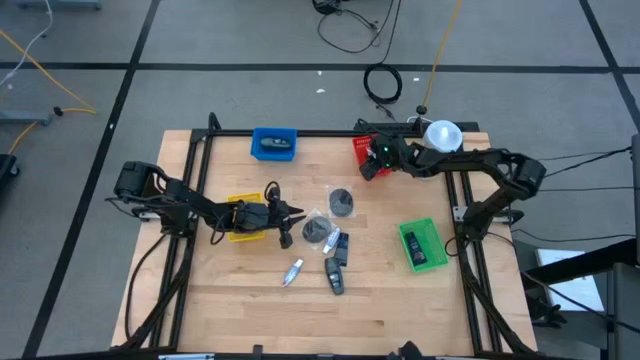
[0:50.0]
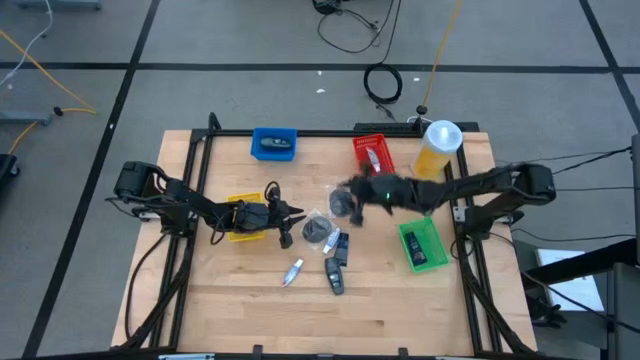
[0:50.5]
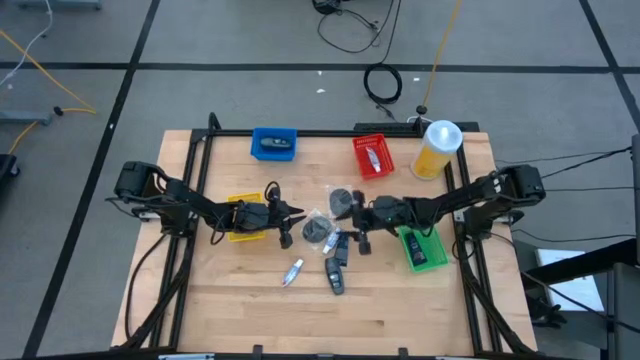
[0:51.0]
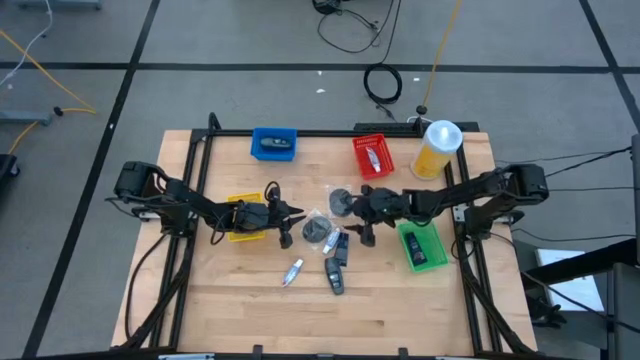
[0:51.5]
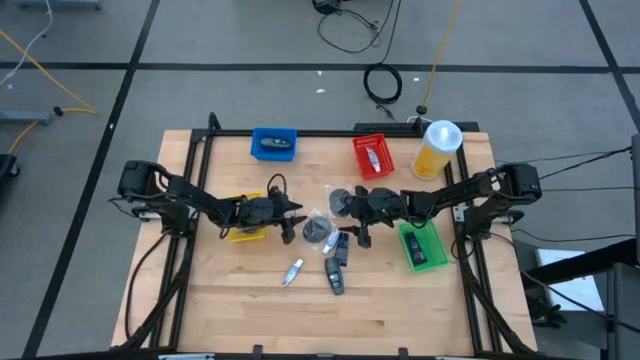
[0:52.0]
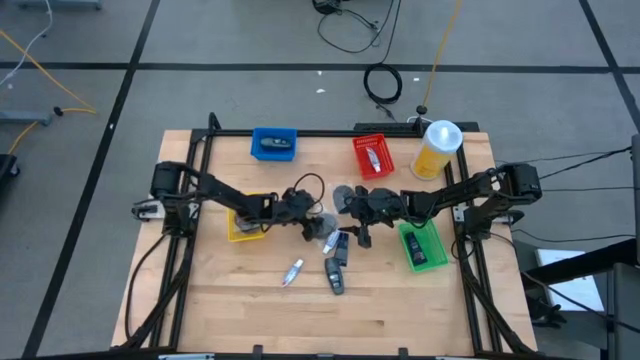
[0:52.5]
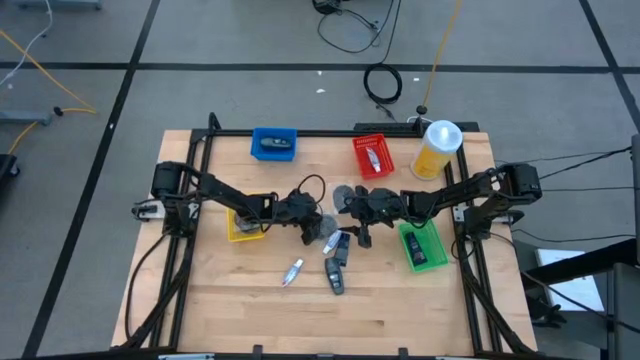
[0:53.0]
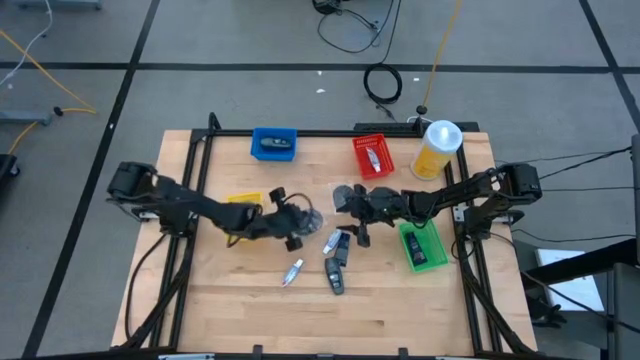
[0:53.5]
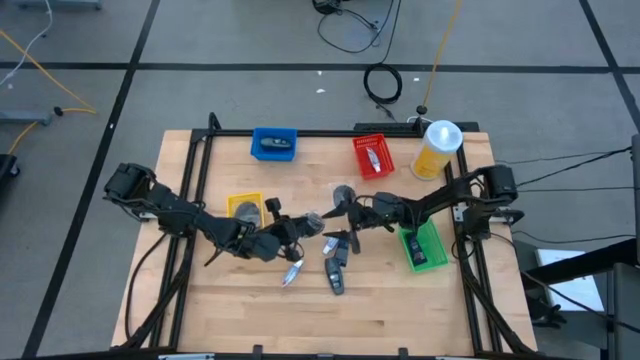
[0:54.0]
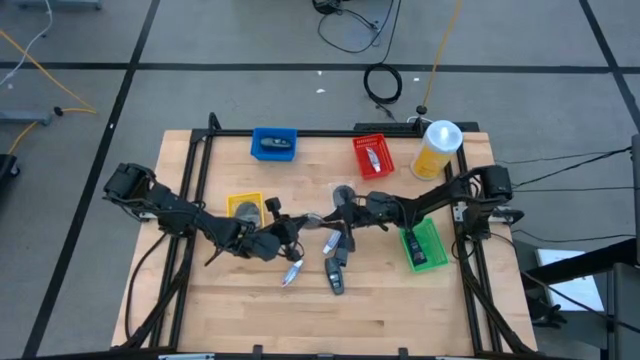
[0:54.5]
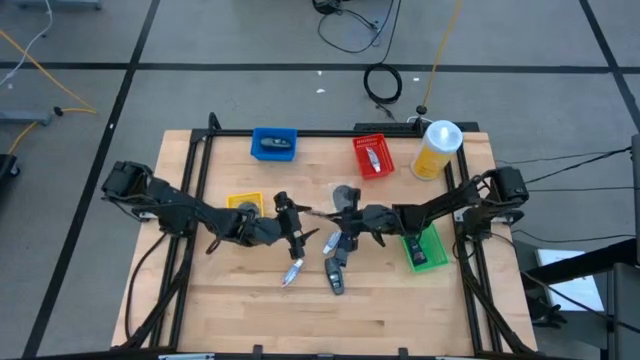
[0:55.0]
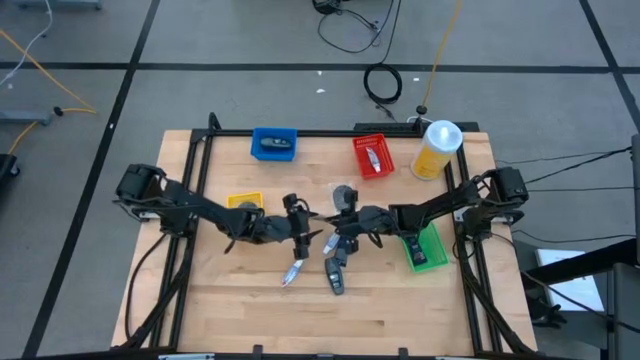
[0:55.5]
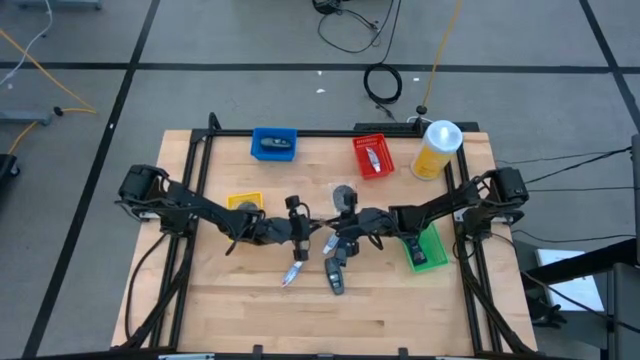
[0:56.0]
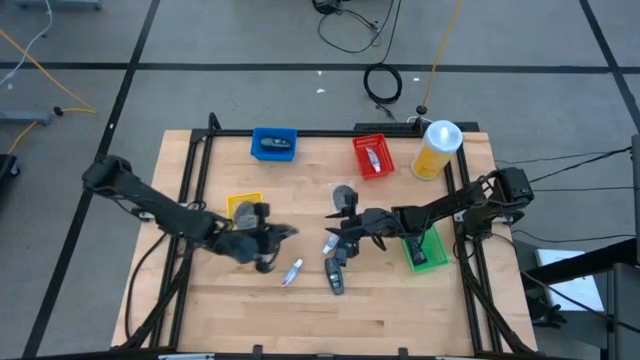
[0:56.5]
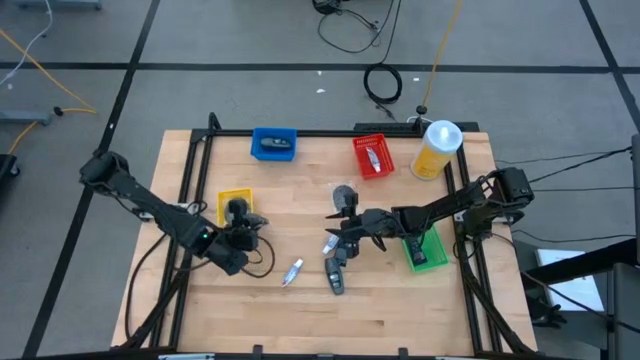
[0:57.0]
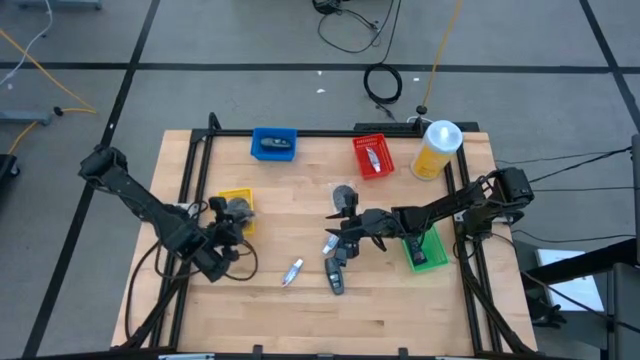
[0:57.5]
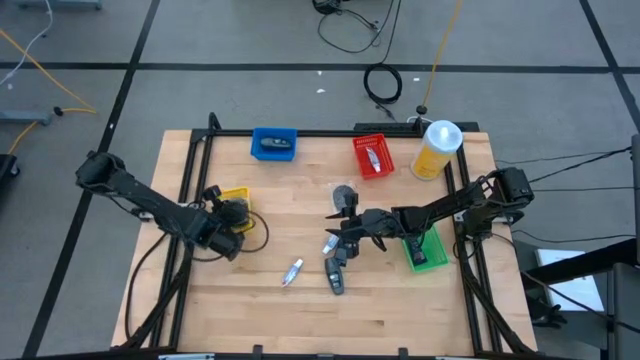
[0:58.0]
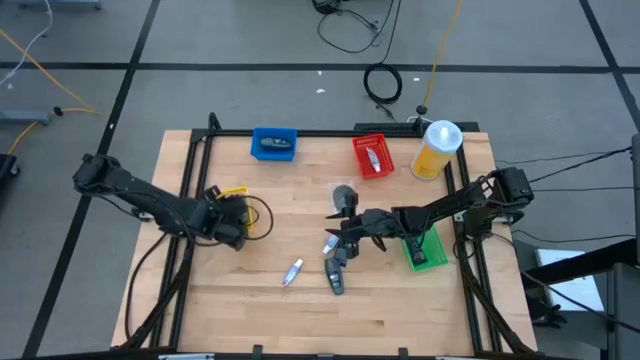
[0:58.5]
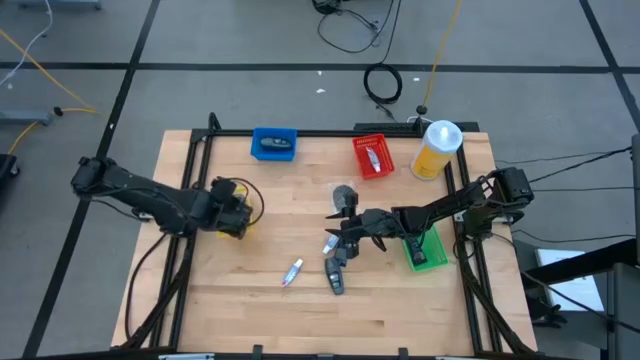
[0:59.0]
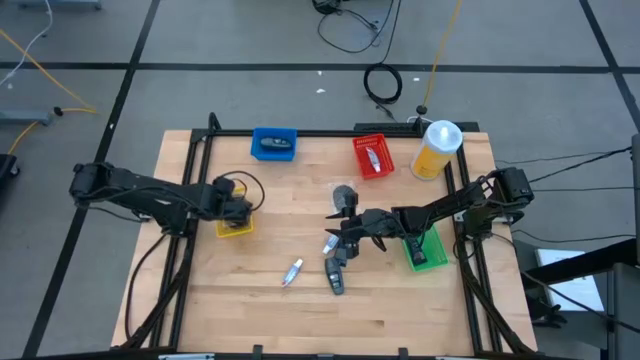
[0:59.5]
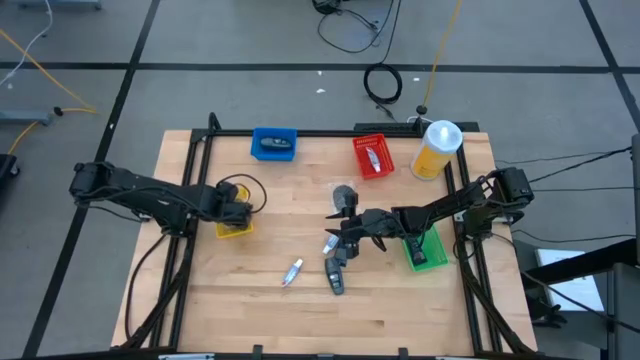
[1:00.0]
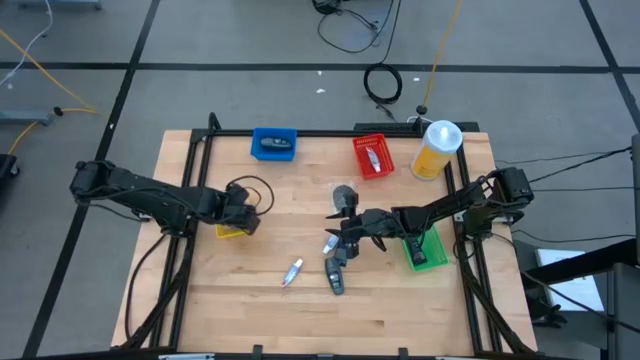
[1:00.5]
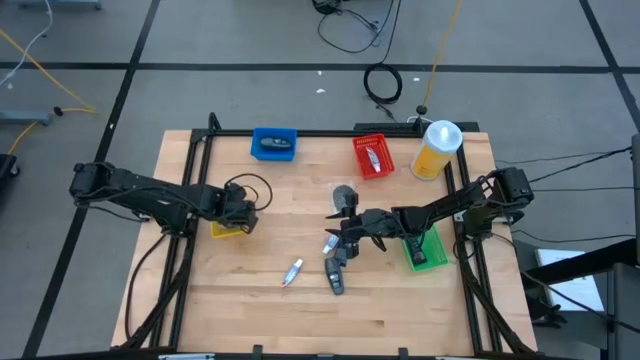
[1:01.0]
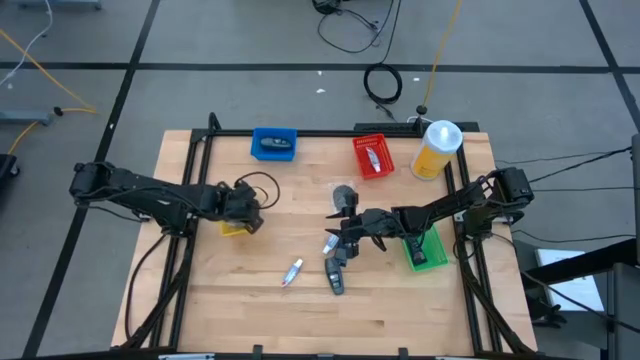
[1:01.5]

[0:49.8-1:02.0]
Task: Pick & Place Travel size toiletries
Put the black hairbrush into the yellow bin

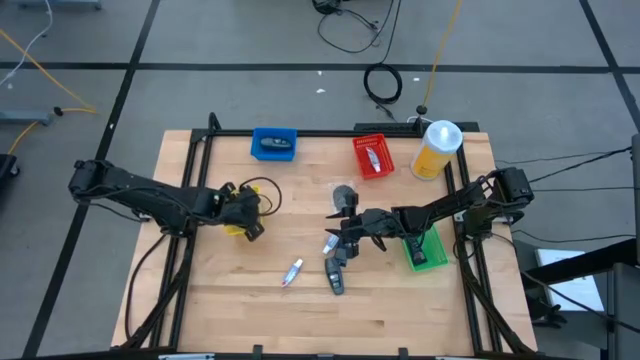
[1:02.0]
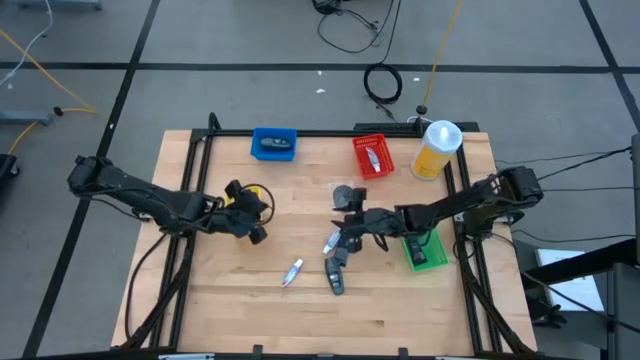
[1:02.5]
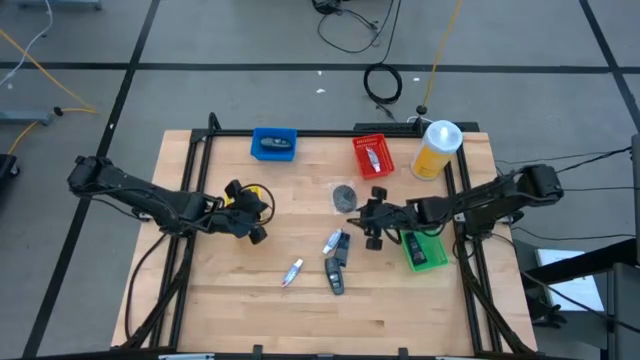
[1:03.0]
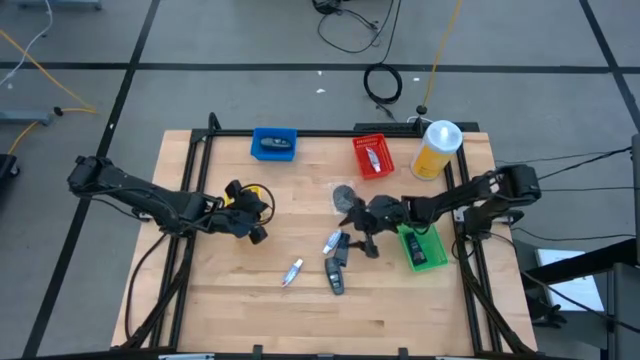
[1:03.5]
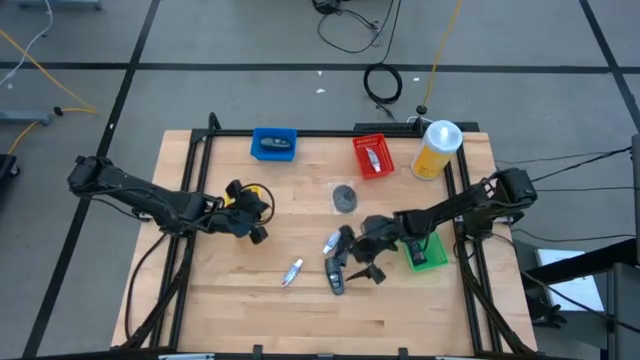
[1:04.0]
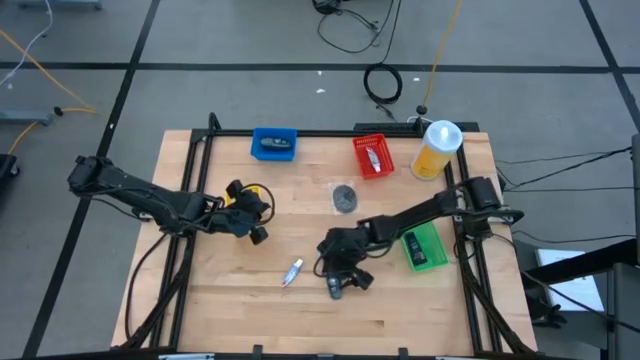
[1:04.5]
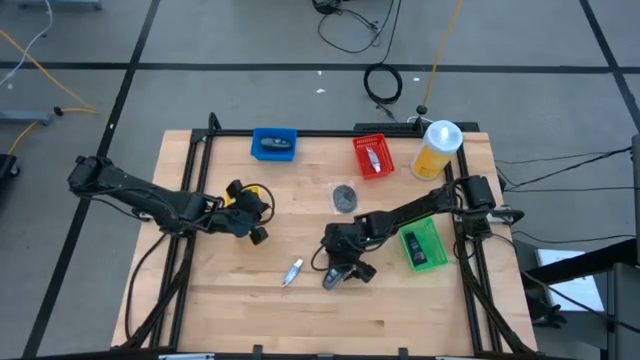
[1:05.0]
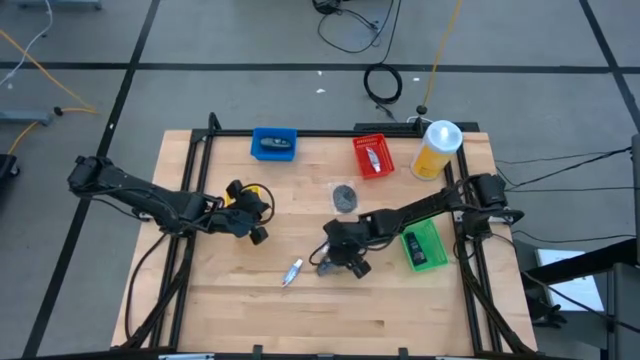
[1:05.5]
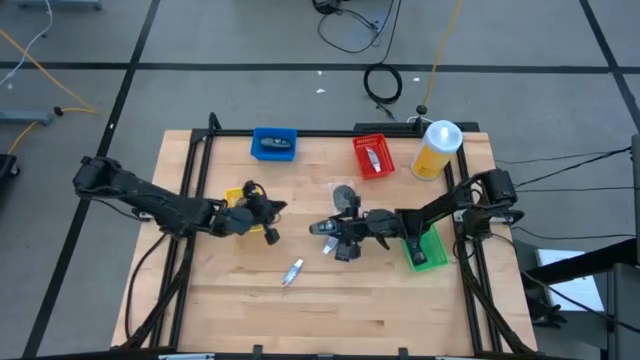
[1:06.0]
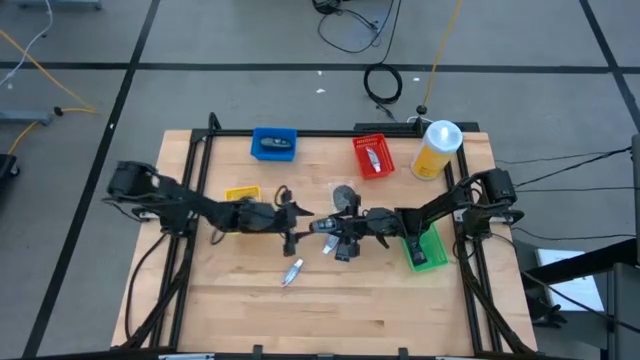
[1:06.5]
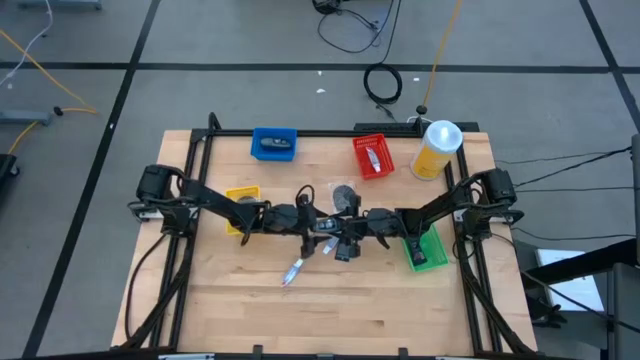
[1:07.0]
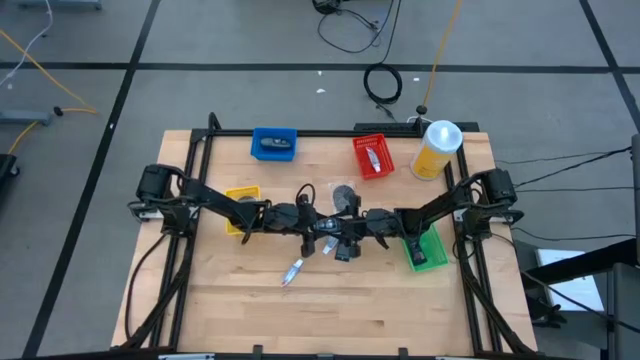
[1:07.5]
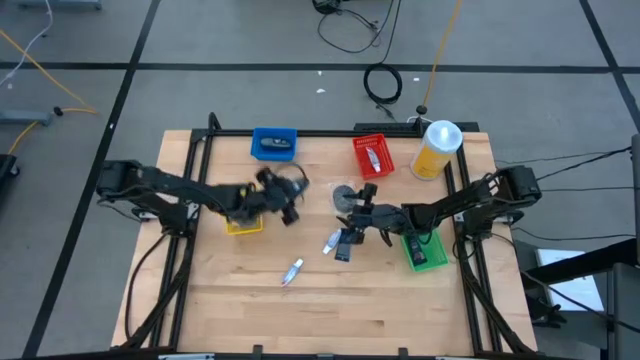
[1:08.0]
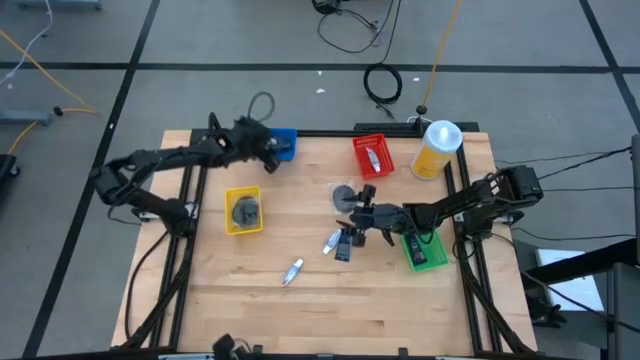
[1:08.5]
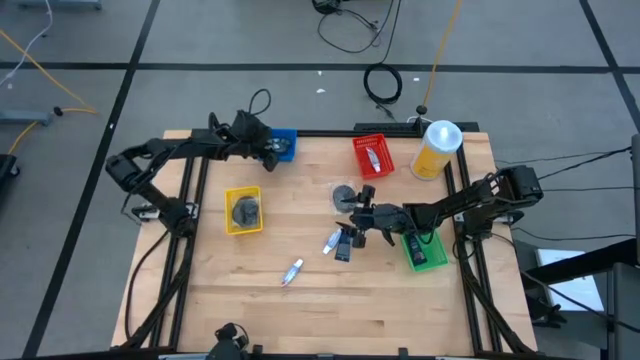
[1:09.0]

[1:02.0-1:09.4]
Put the gray deodorant into the blue bin
